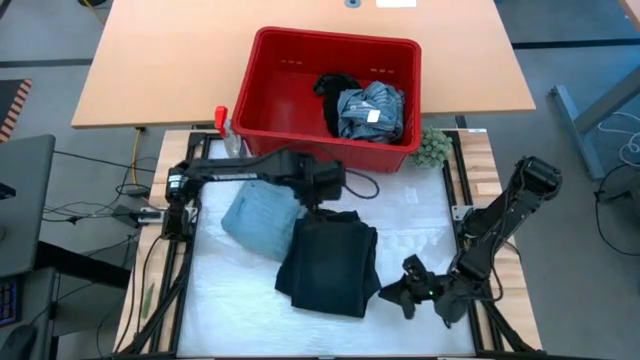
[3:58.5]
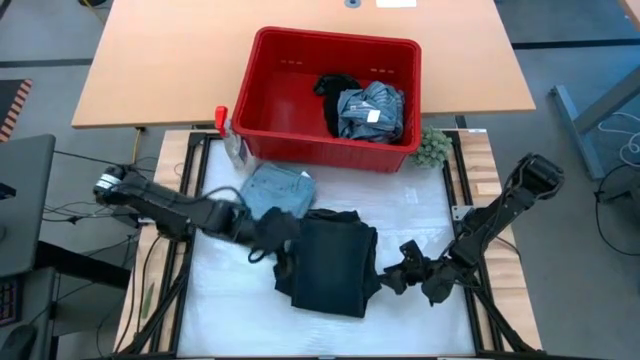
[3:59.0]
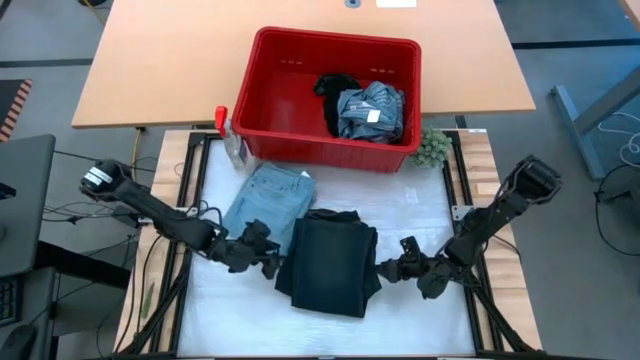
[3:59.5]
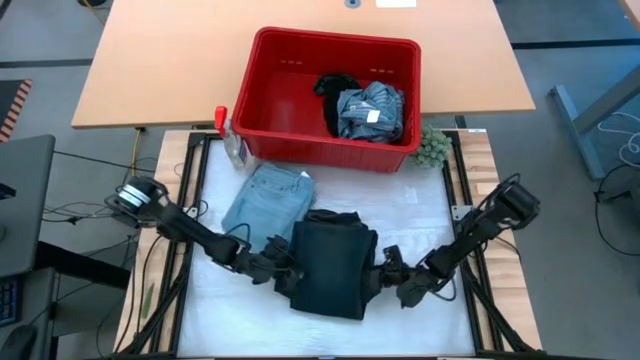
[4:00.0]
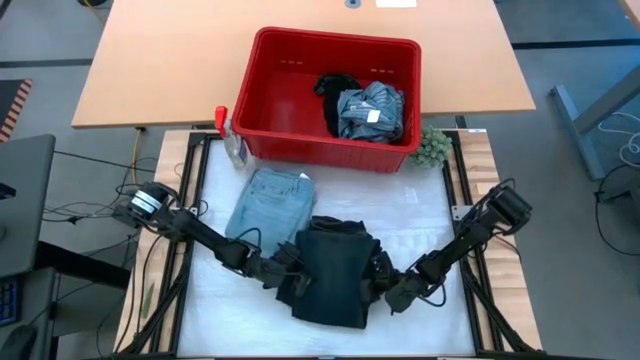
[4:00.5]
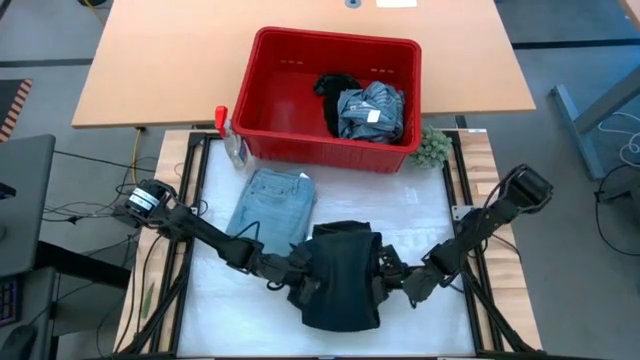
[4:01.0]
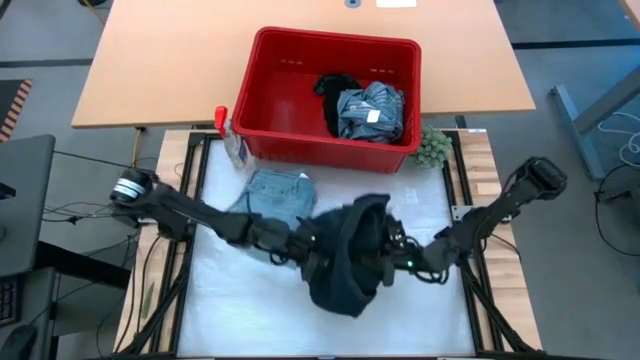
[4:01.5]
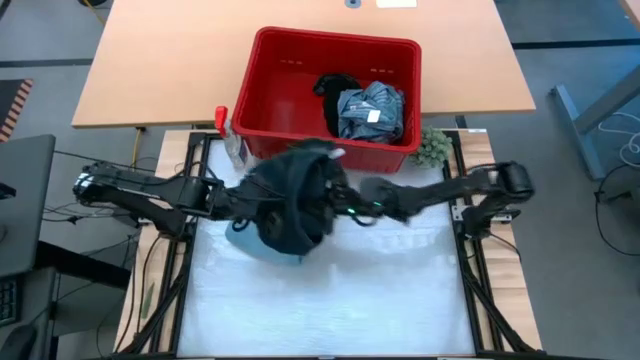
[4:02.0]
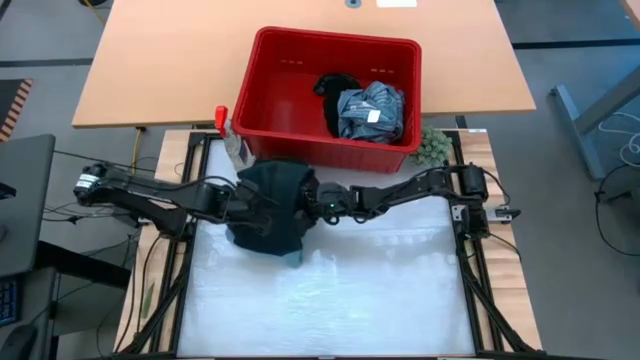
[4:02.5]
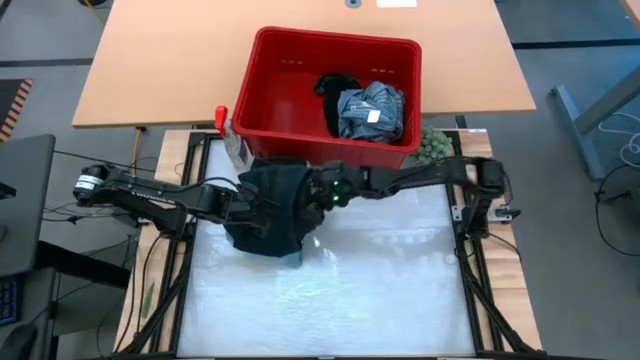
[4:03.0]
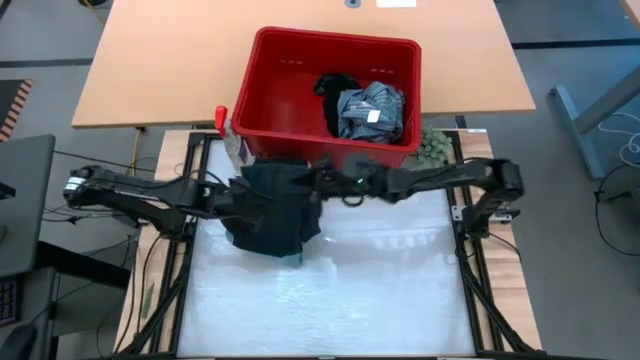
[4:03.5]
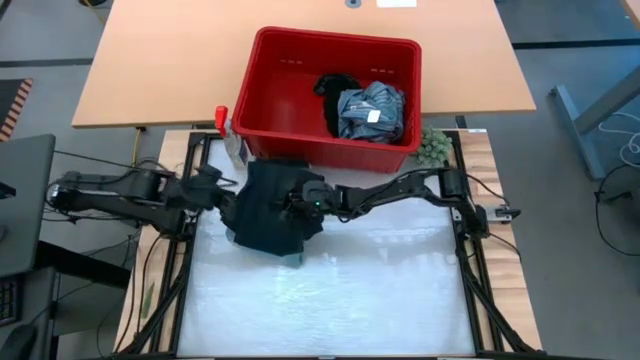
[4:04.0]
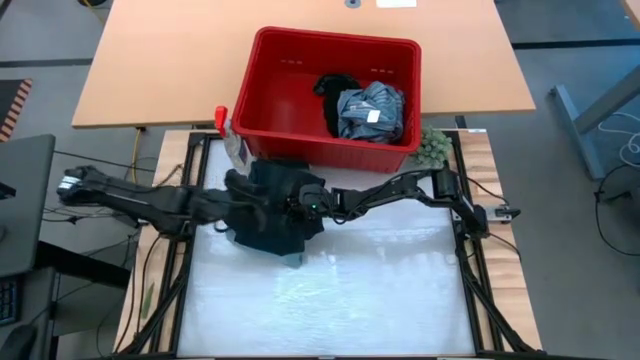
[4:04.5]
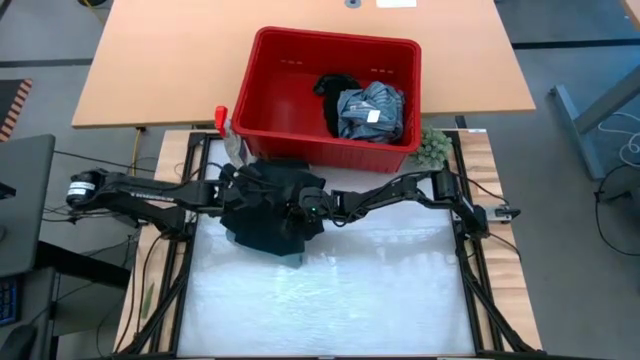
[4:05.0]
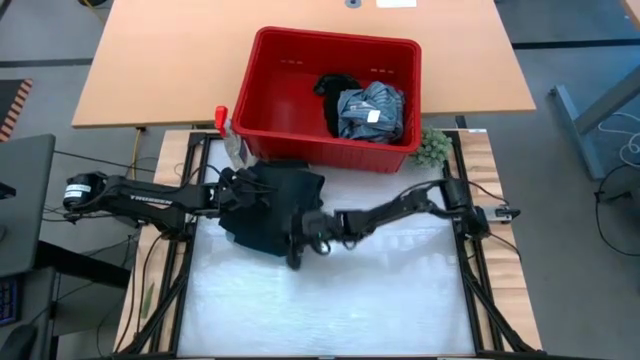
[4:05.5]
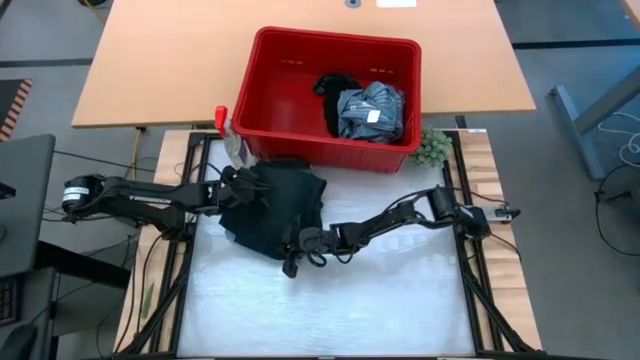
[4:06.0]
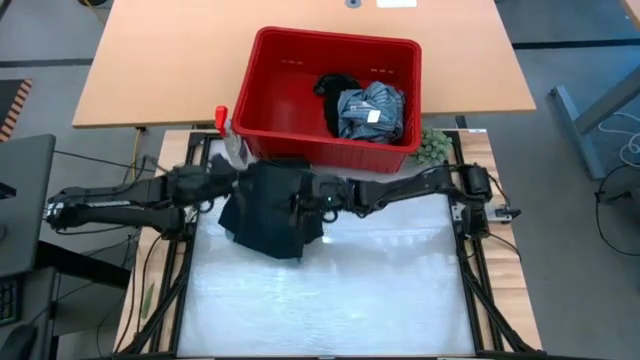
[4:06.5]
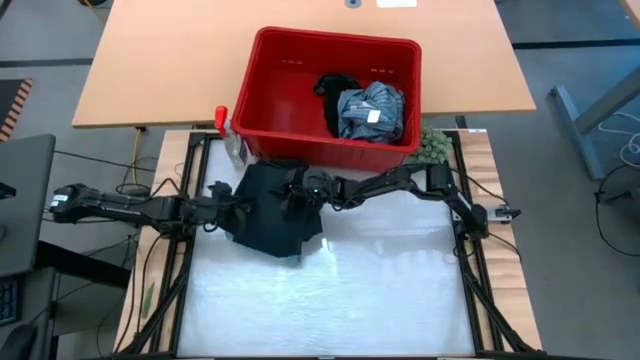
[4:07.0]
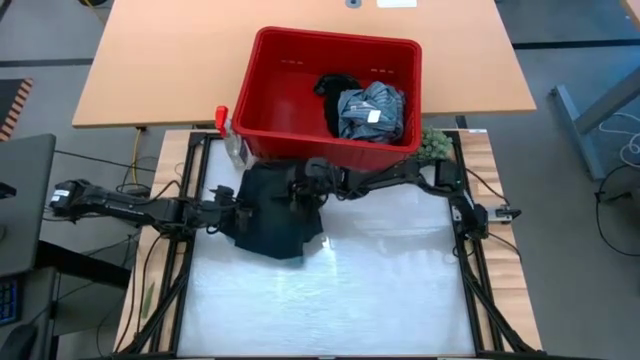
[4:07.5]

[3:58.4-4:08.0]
Task: Fold laundry
Stack the black pants on the blue pants

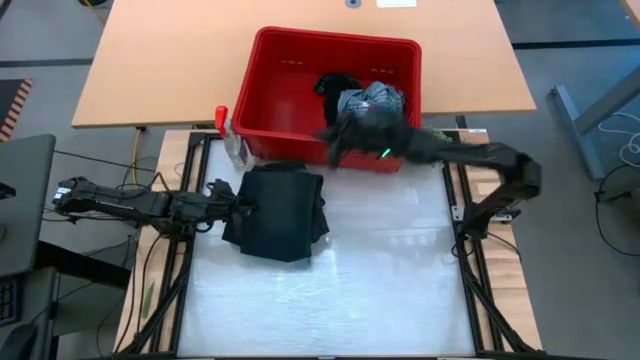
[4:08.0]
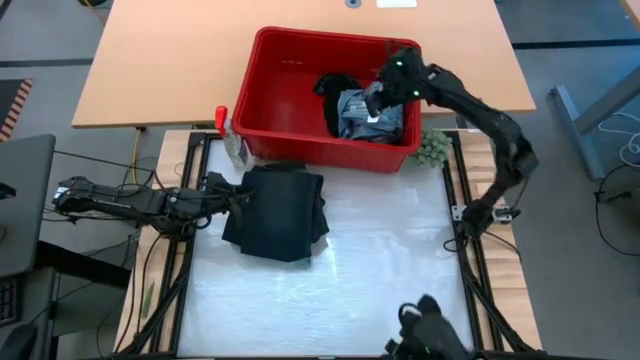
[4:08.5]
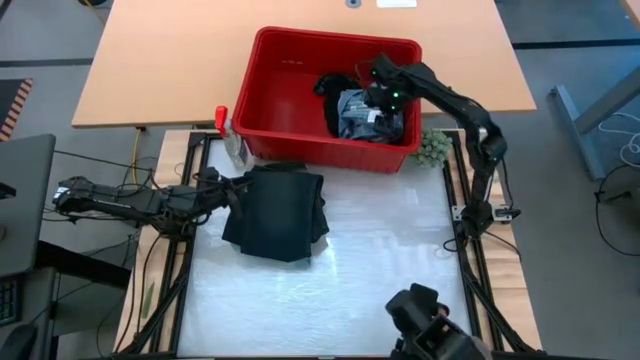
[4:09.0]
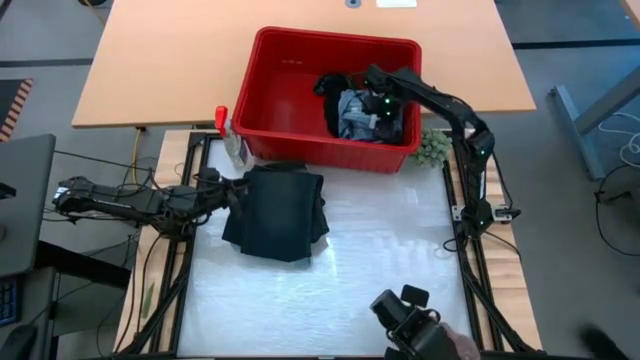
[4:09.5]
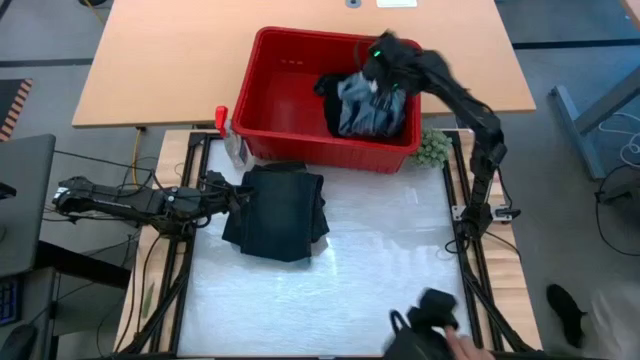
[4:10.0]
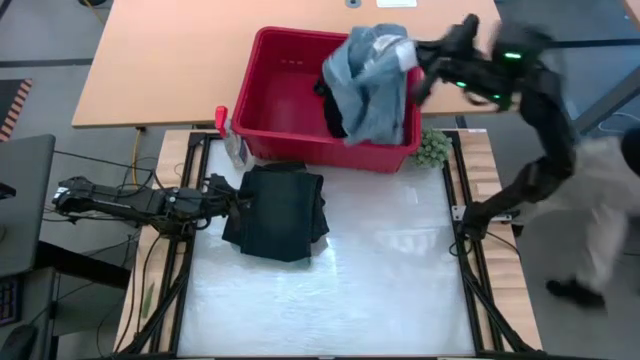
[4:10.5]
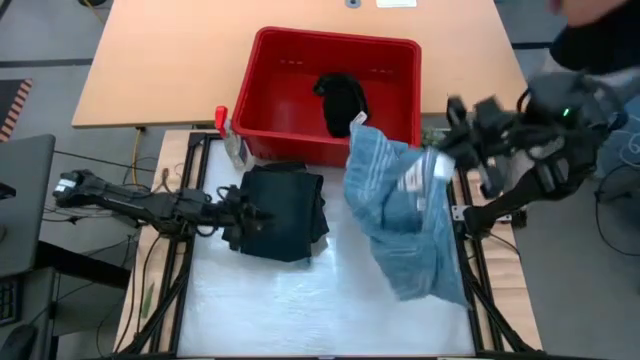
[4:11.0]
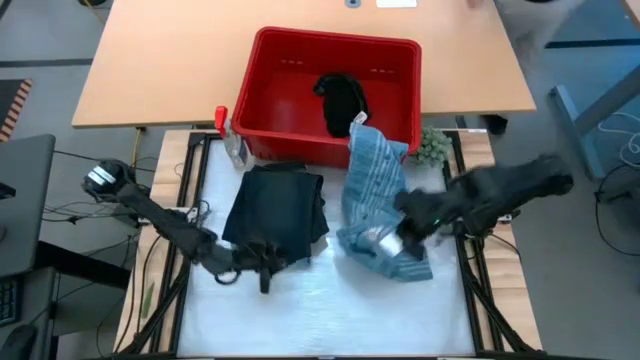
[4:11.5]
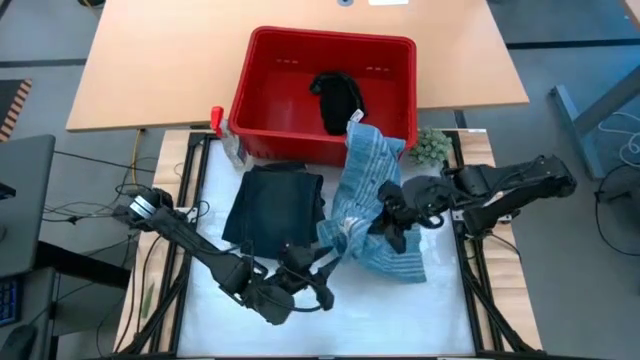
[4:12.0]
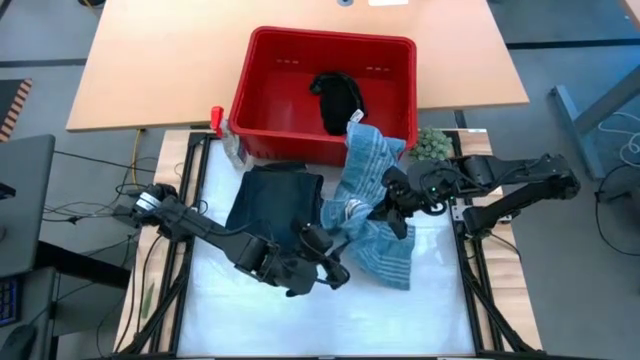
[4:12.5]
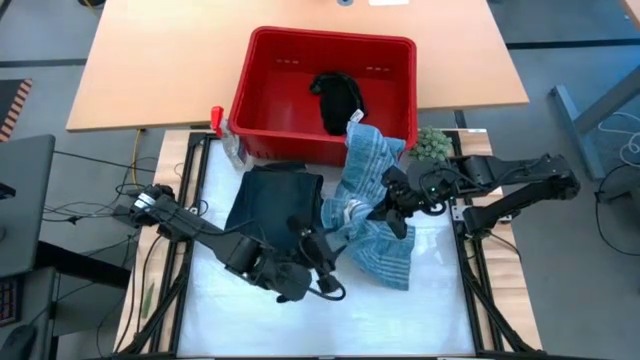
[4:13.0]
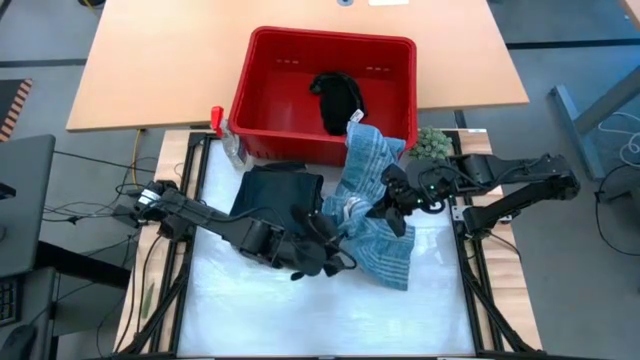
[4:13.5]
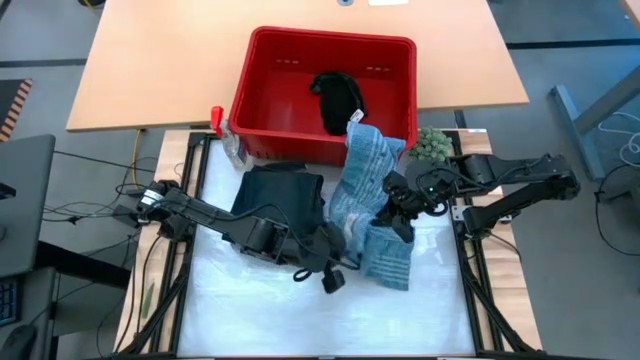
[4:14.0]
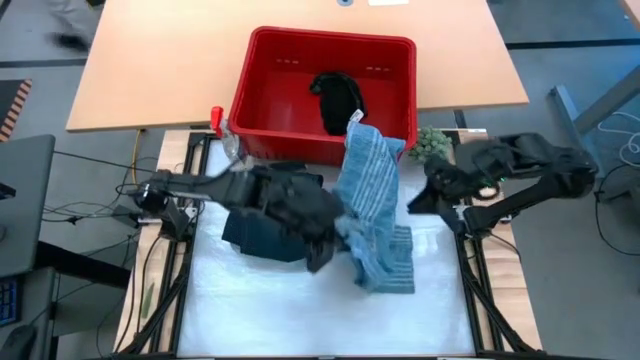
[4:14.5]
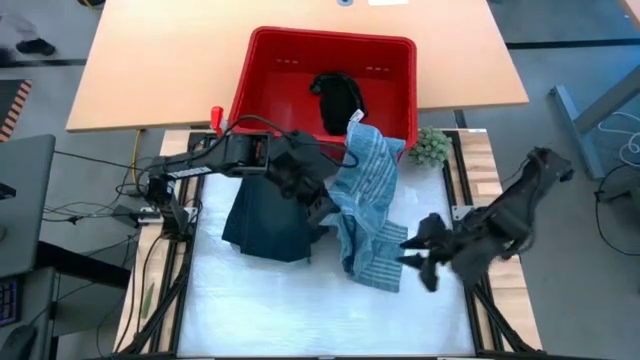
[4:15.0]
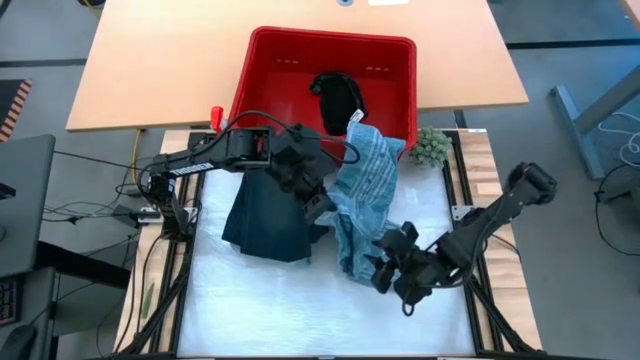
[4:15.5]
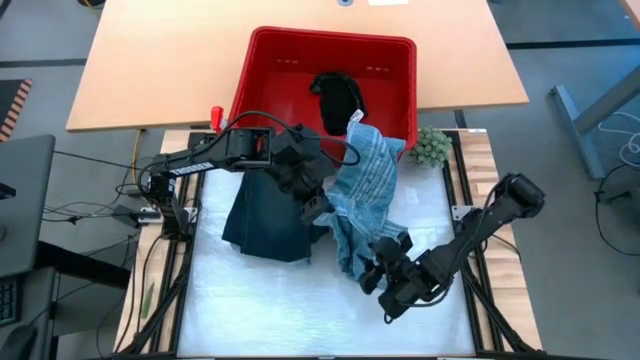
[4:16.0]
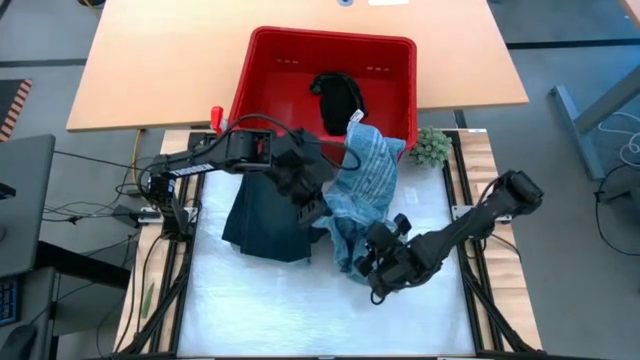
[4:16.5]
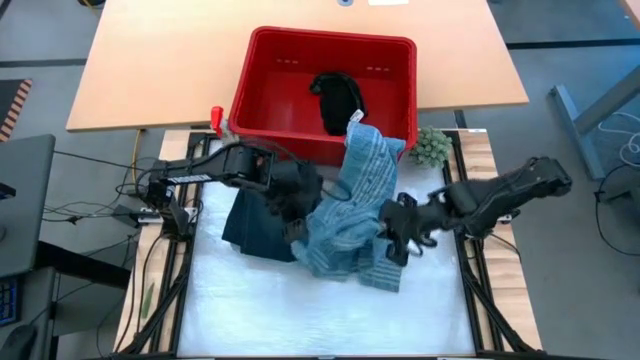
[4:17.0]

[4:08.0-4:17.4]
Fold the blue shirt from the red laundry bin

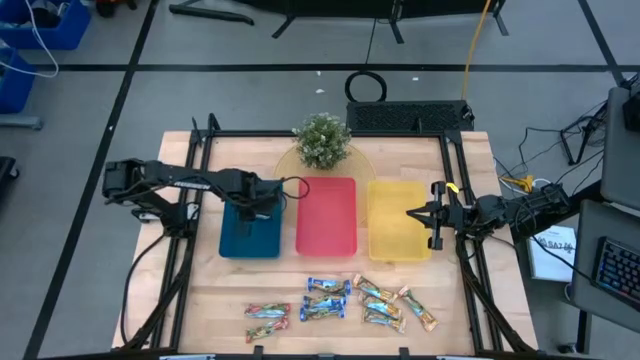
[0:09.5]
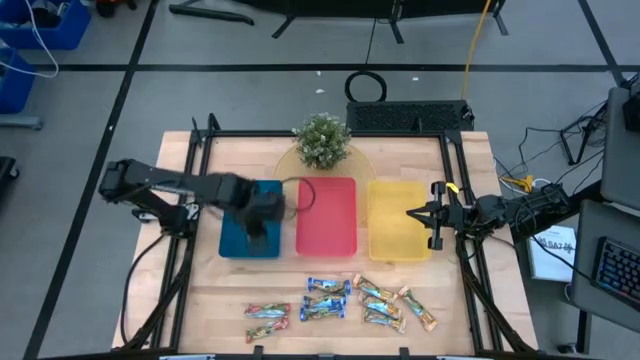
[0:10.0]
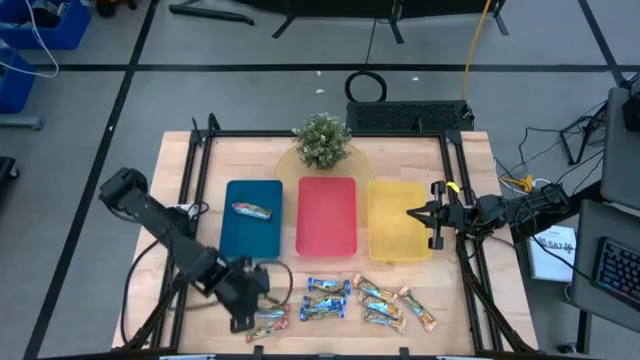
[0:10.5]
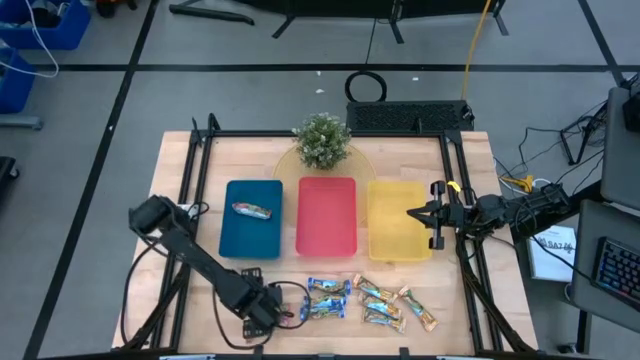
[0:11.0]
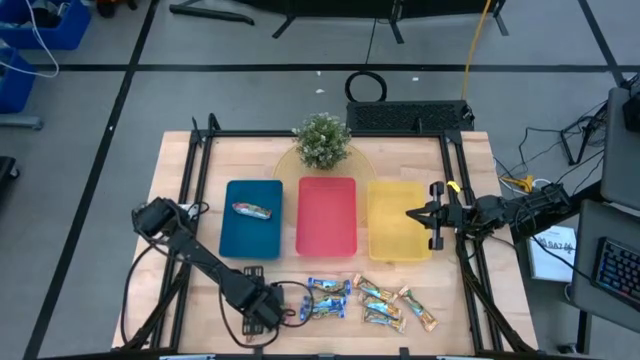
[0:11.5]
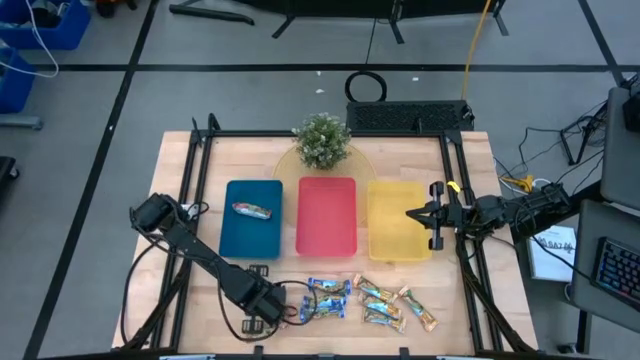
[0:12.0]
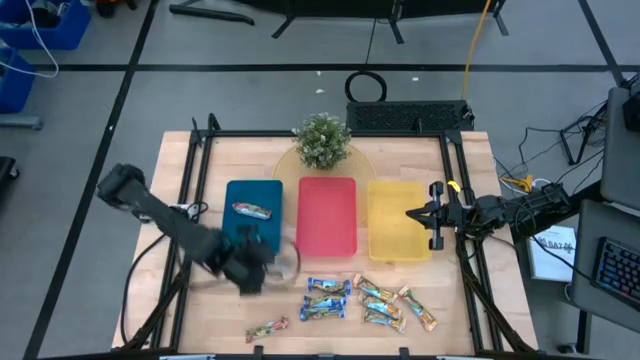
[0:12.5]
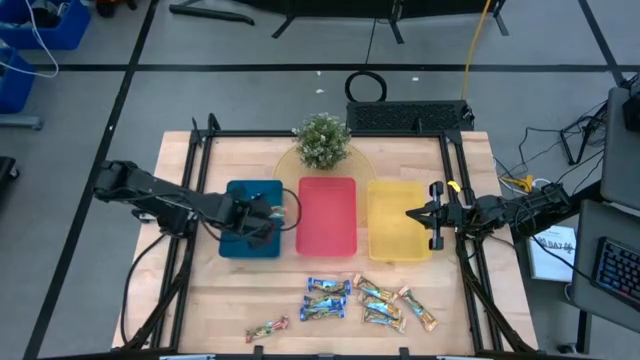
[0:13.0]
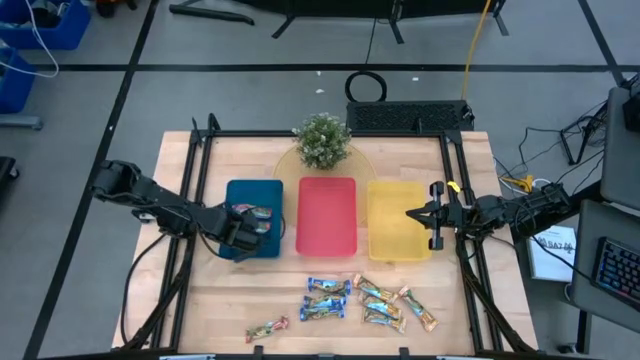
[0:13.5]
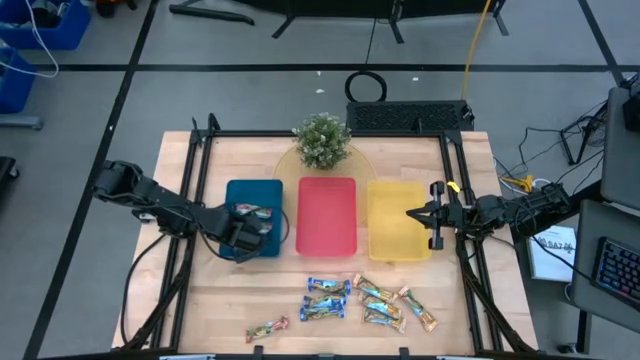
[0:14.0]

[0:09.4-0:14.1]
Task: Pick and place Granola Bars by type
Put the top red granola bar into the blue bin
